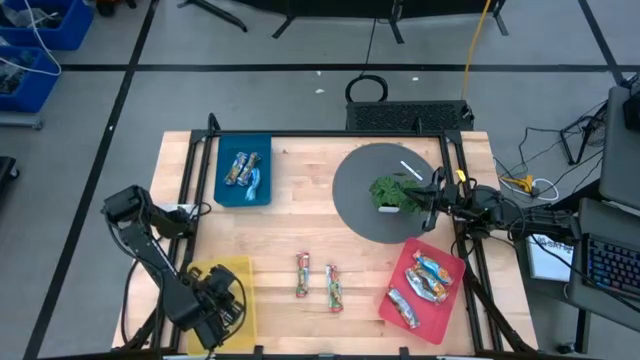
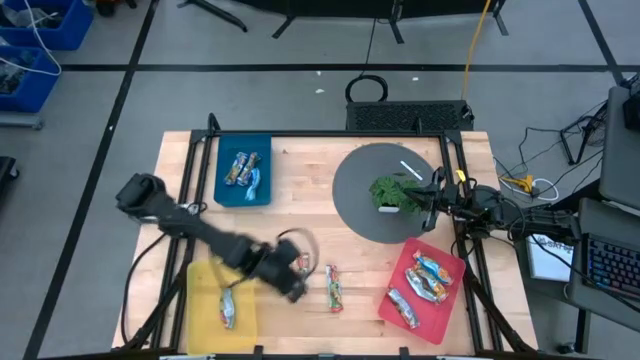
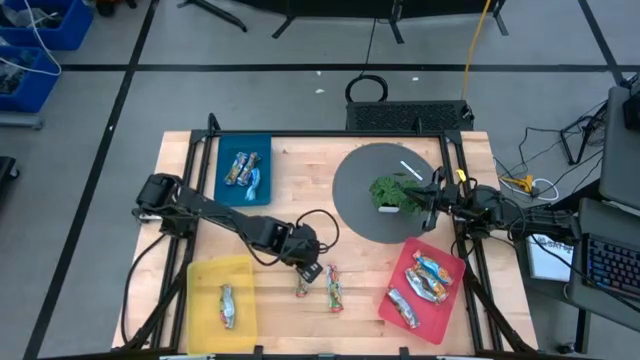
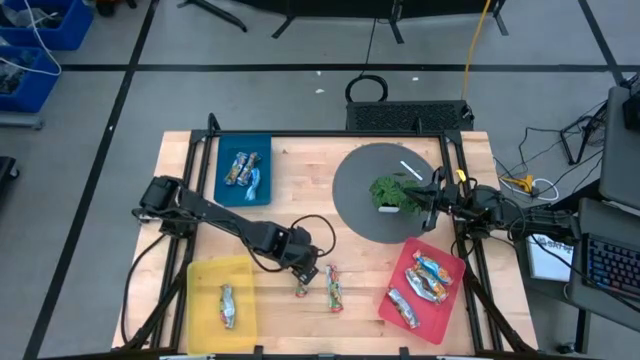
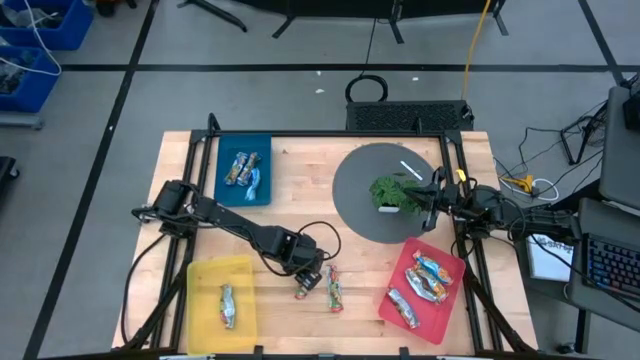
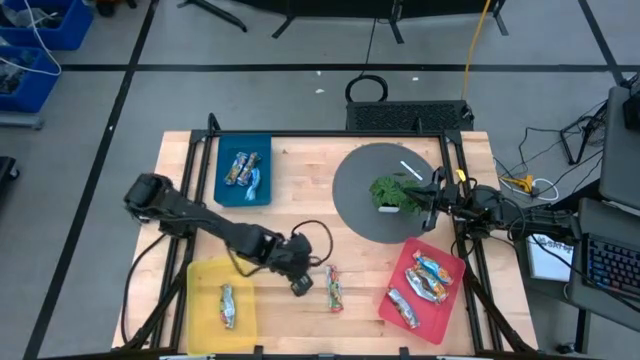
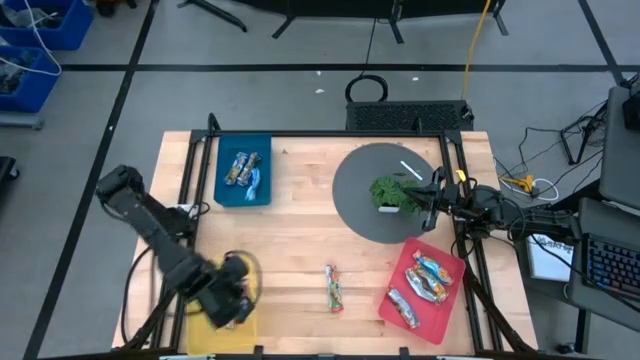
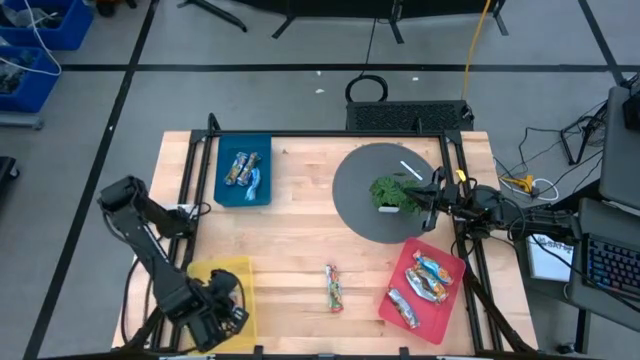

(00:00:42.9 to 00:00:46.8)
Task: Pick and place Granola Bars by type
Put the red granola bar into the yellow bin

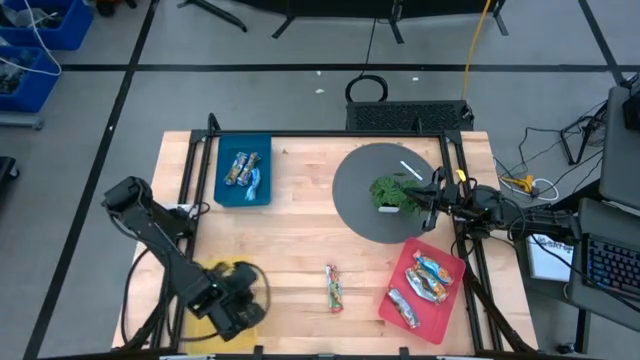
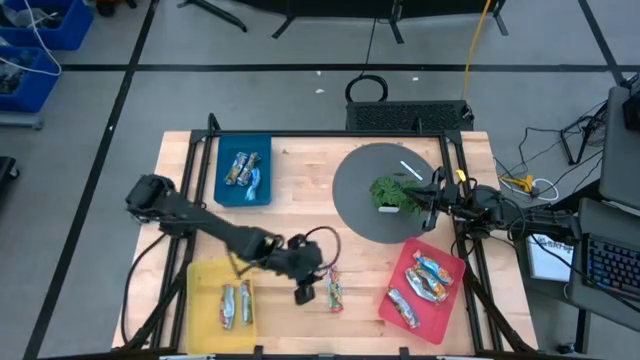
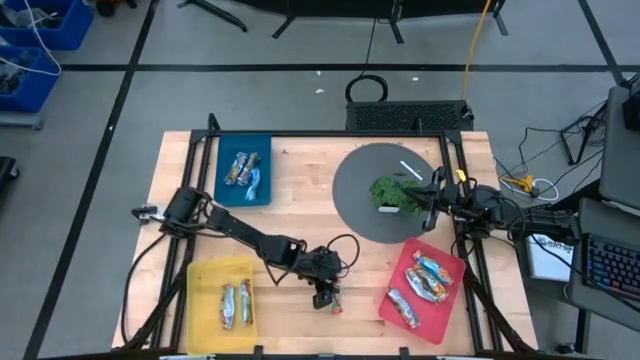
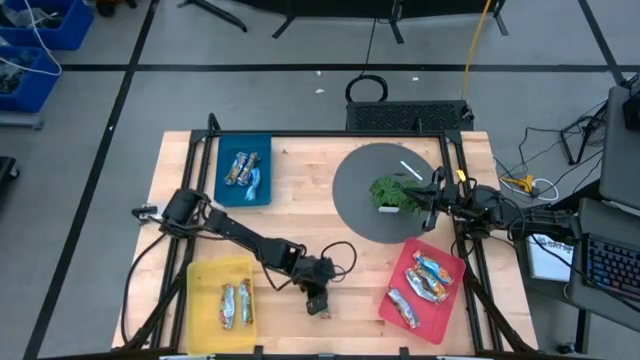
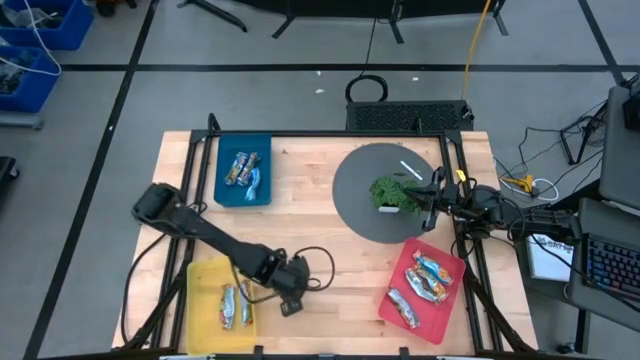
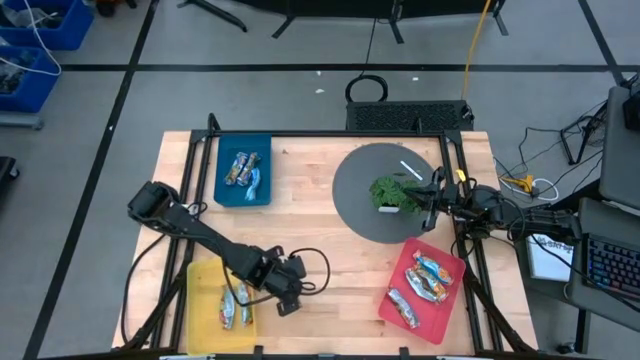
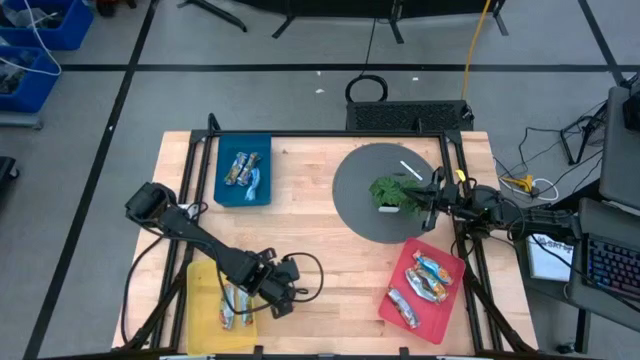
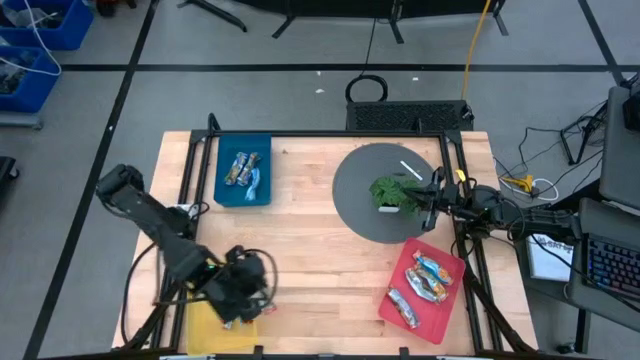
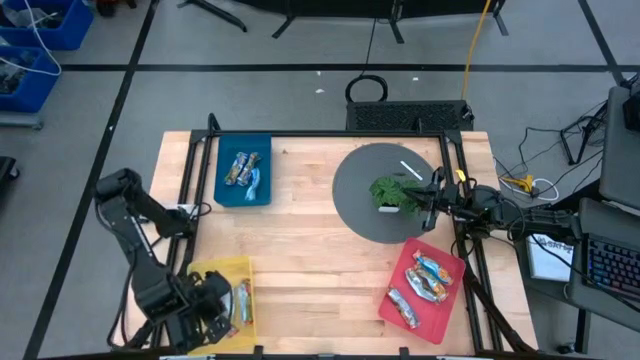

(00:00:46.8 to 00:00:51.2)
Put the red granola bar into the yellow bin

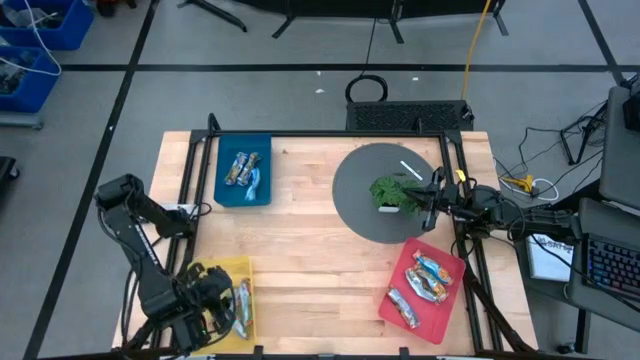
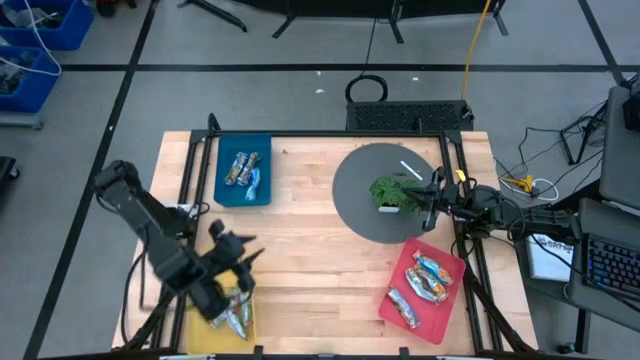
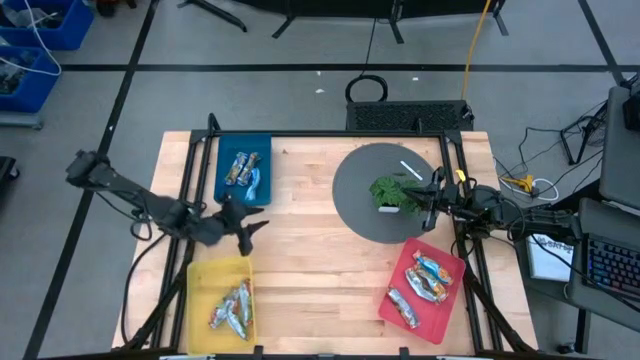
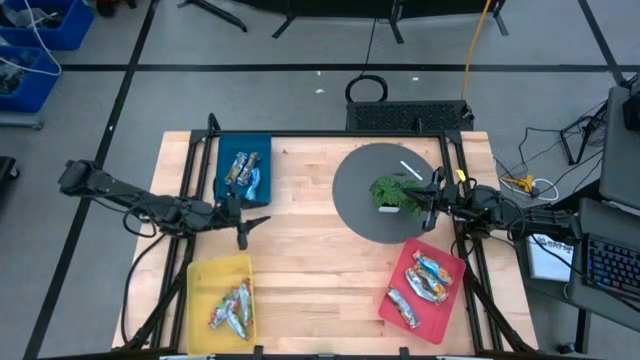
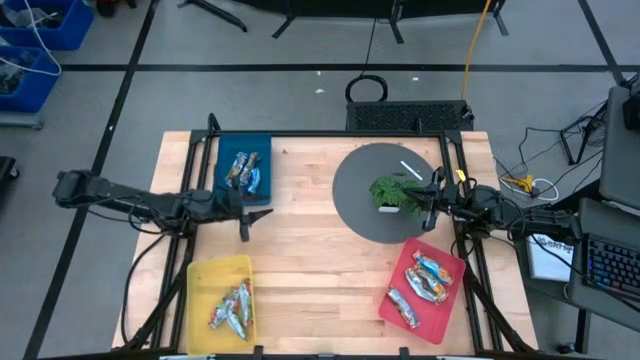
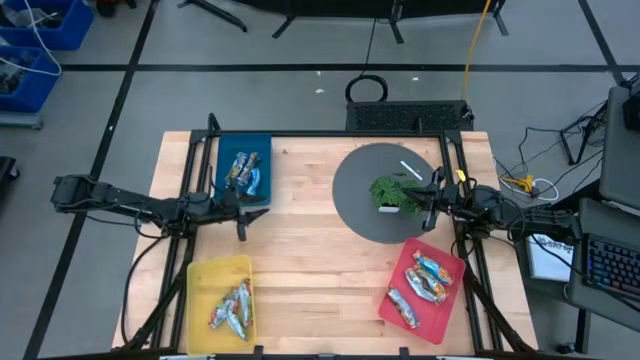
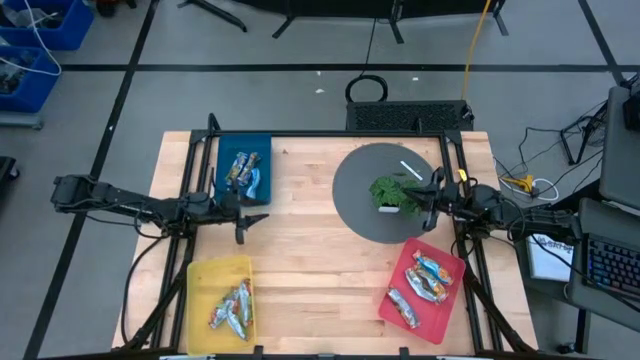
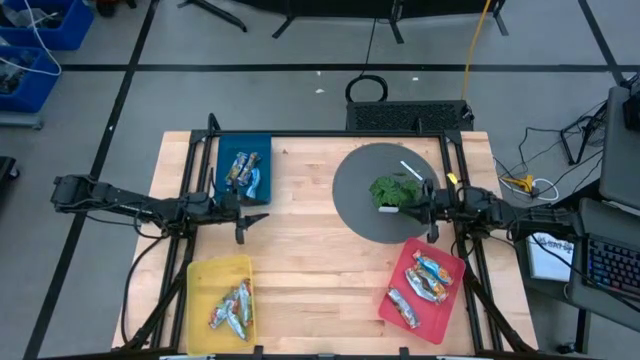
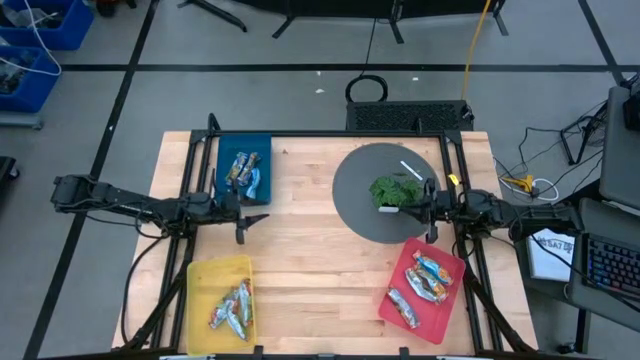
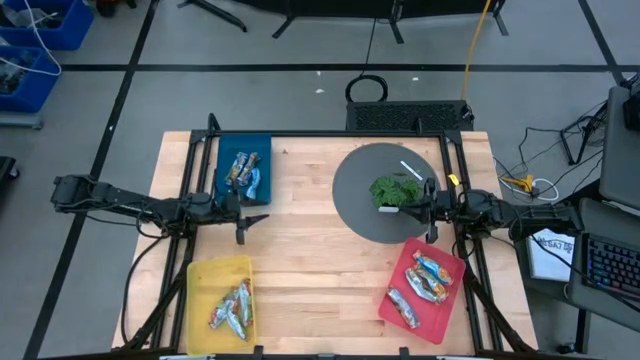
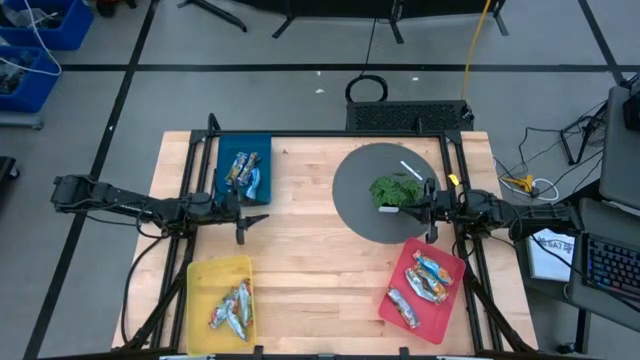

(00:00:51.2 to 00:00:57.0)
Return to Home Position

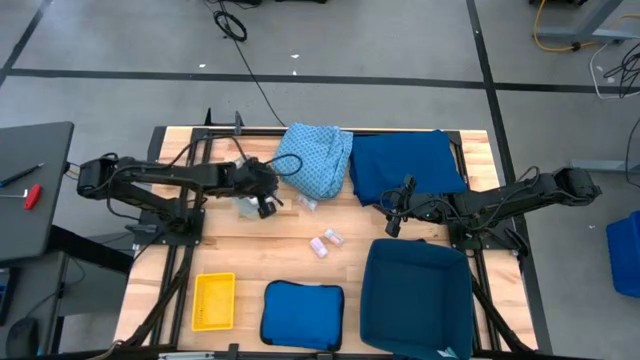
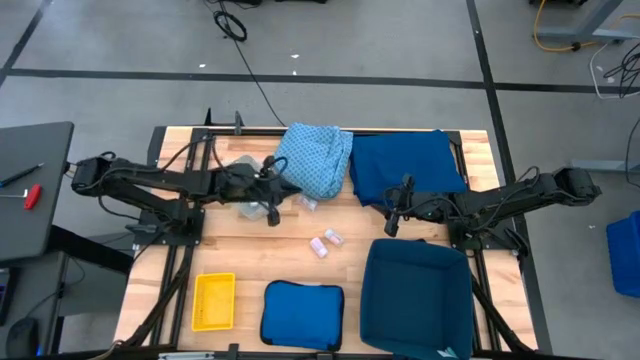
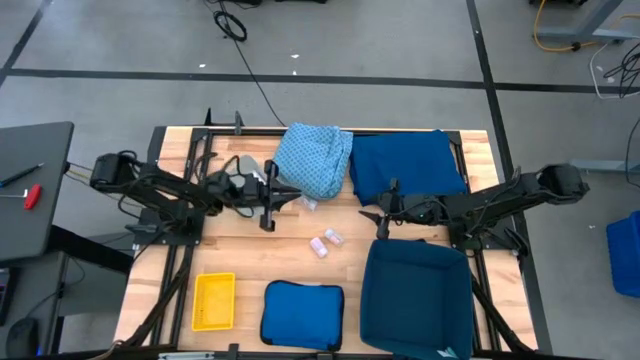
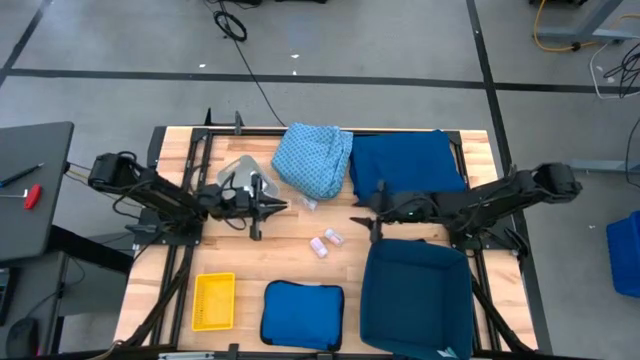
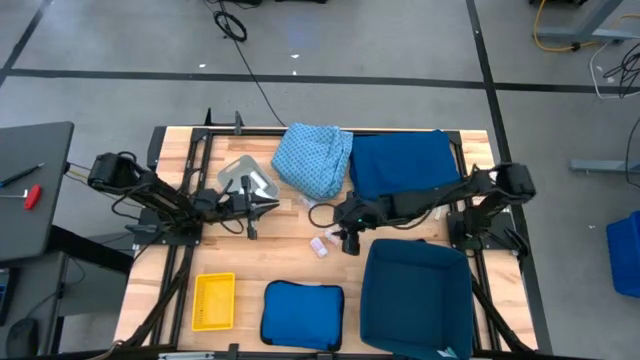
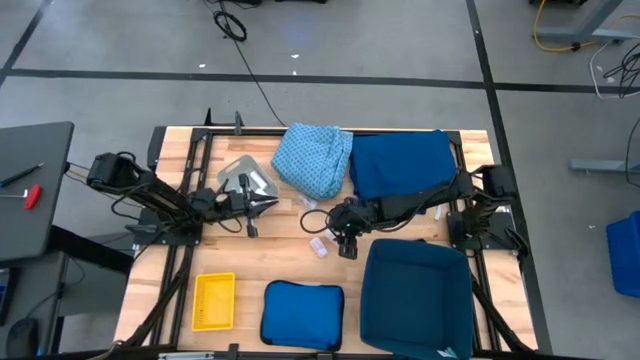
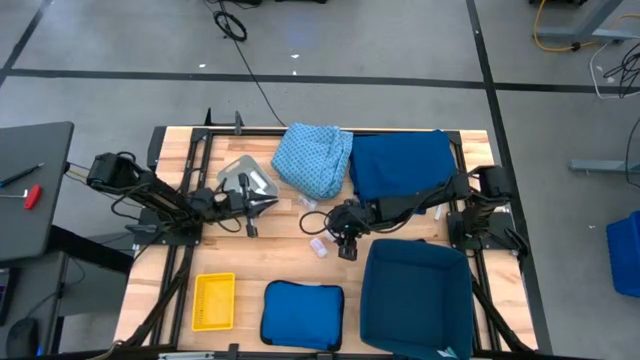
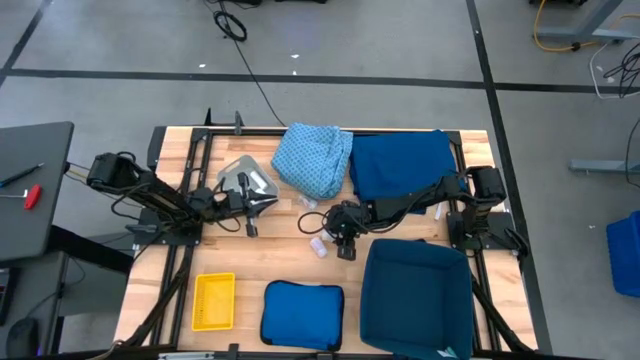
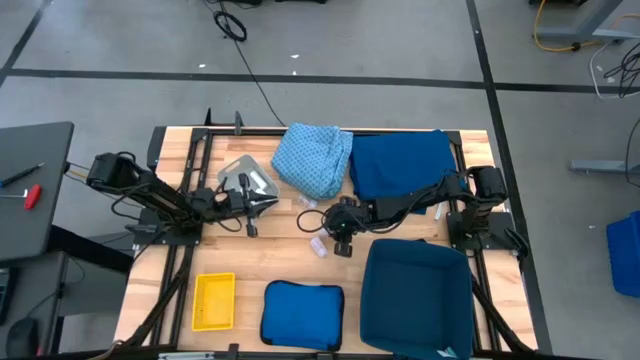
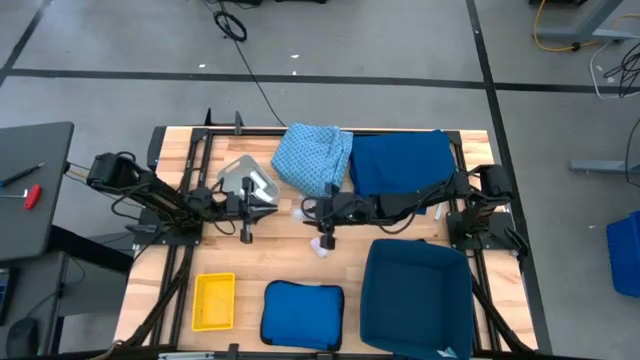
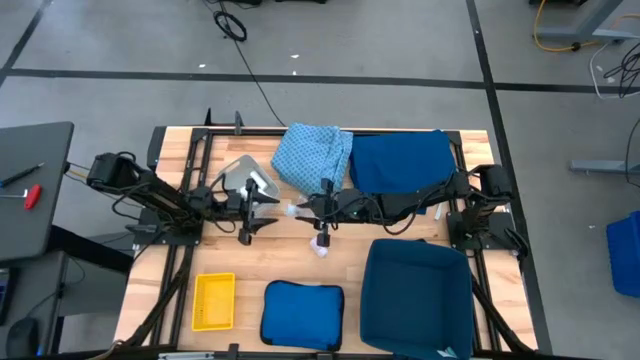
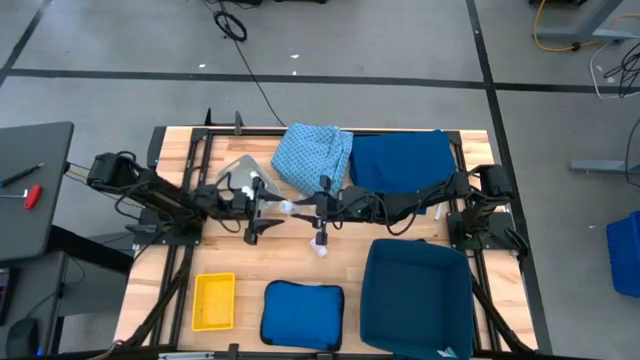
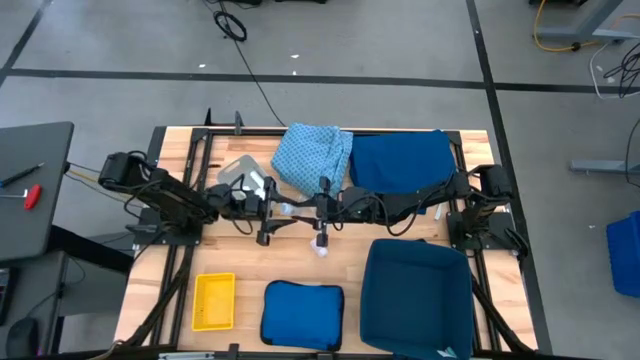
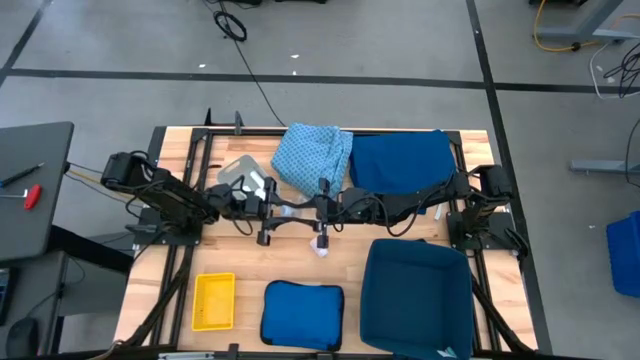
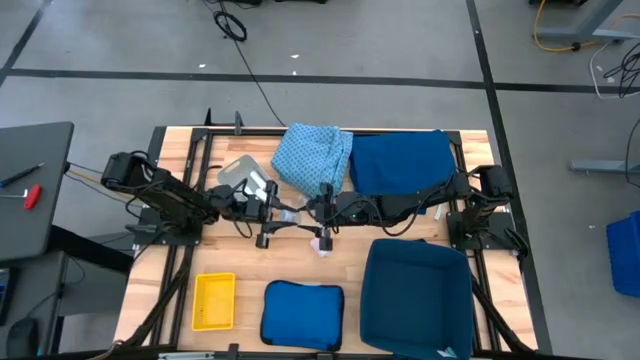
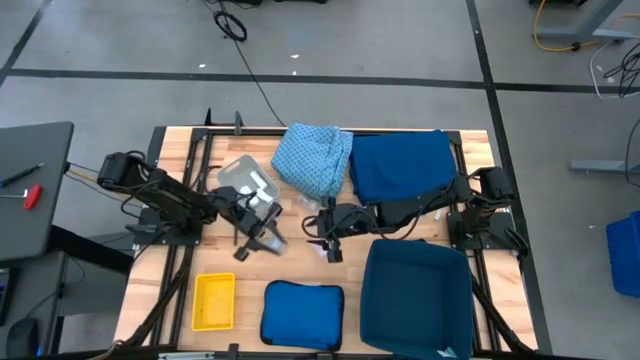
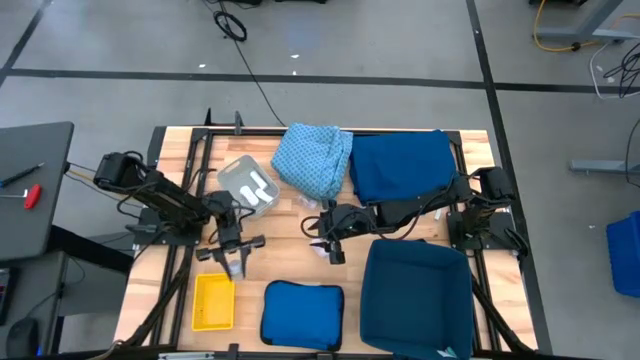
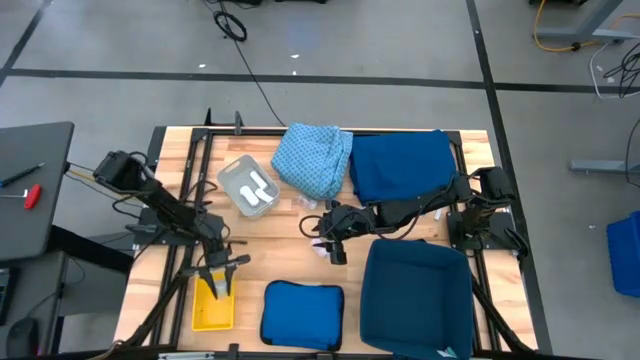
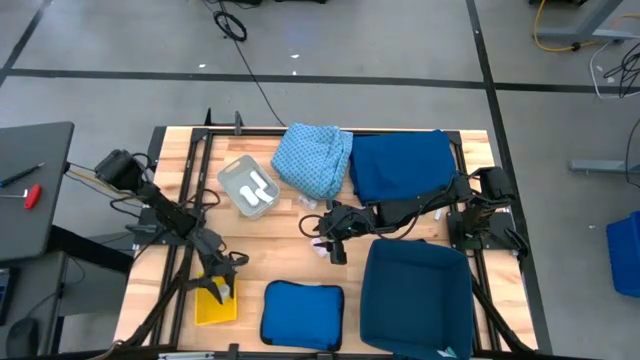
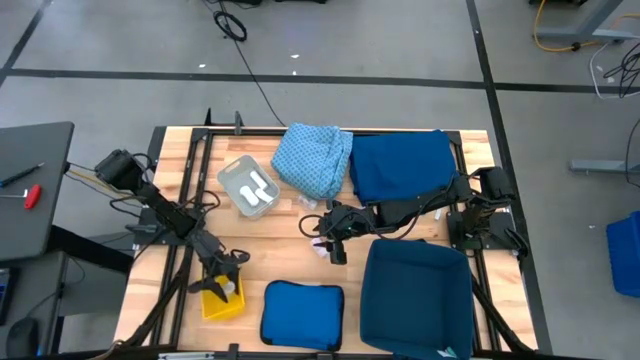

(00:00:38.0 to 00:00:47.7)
Task: Pick & place medical supplies in basket/bin
Put the middle white medicine bottle into the yellow bin
